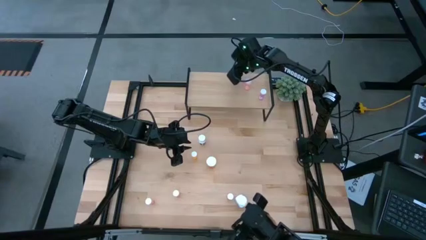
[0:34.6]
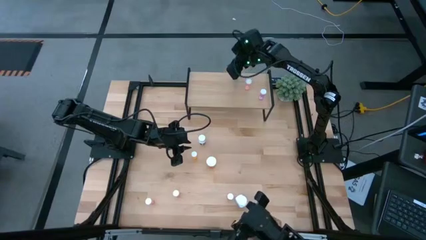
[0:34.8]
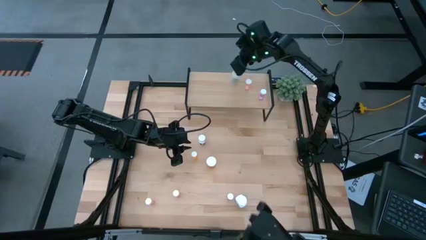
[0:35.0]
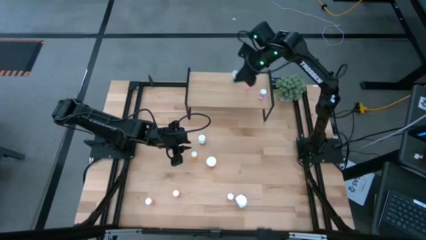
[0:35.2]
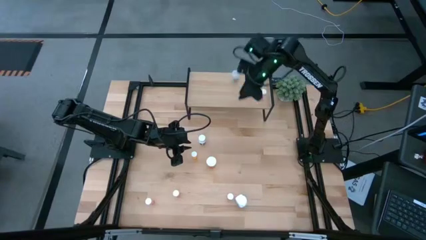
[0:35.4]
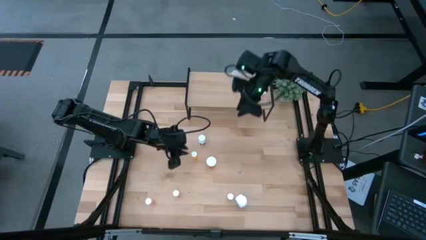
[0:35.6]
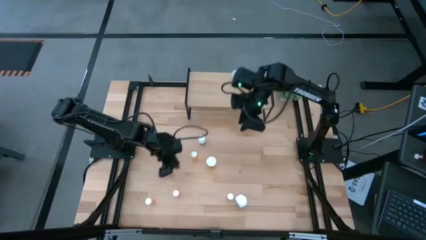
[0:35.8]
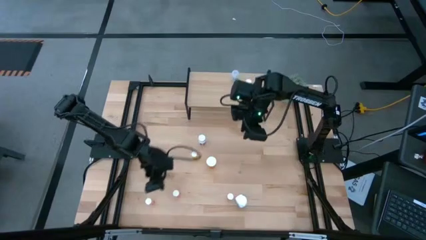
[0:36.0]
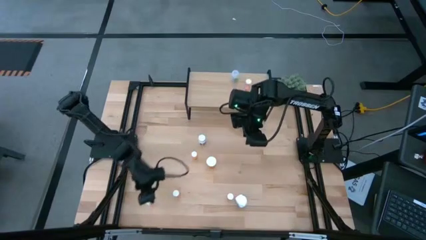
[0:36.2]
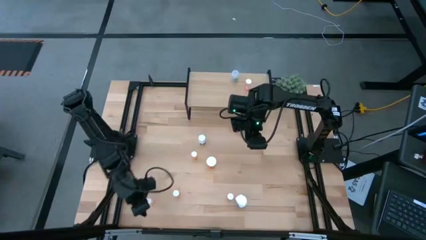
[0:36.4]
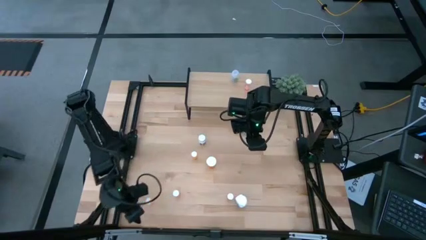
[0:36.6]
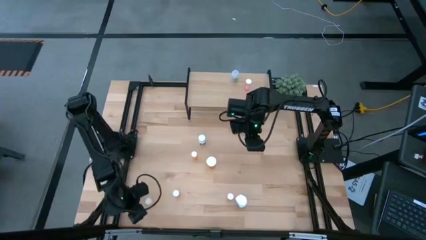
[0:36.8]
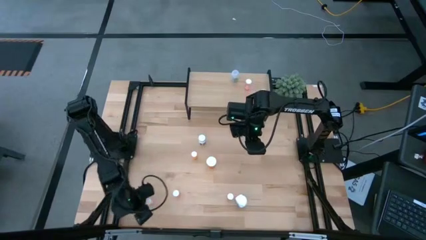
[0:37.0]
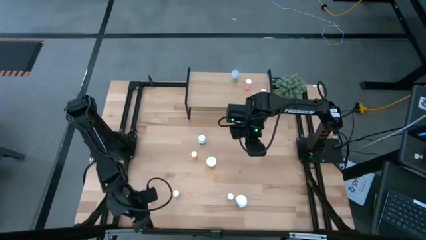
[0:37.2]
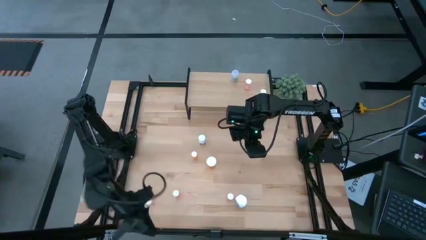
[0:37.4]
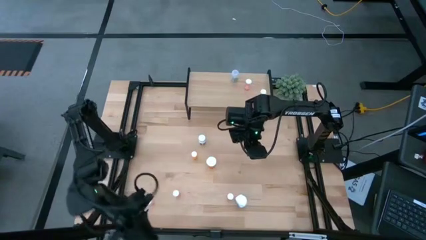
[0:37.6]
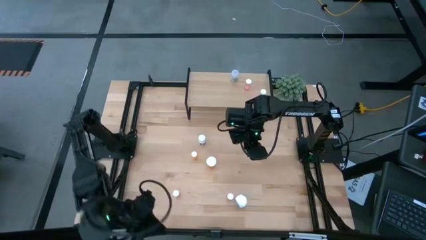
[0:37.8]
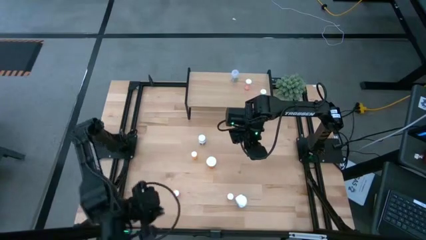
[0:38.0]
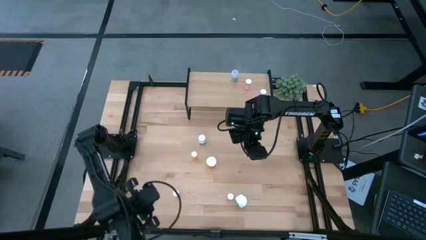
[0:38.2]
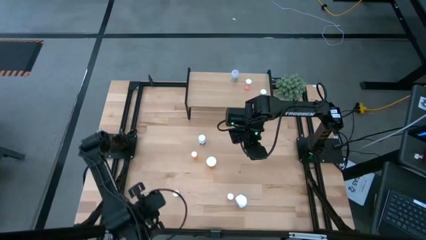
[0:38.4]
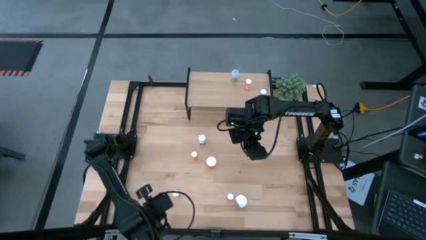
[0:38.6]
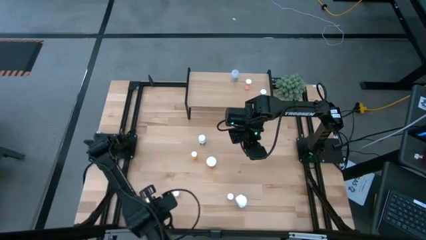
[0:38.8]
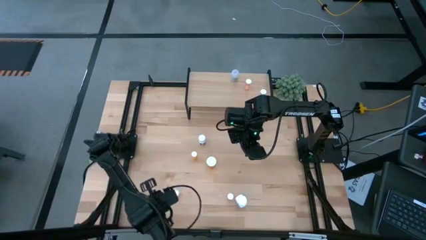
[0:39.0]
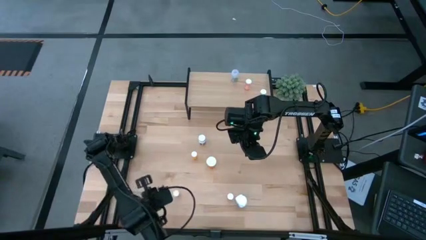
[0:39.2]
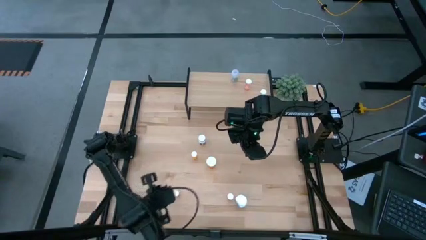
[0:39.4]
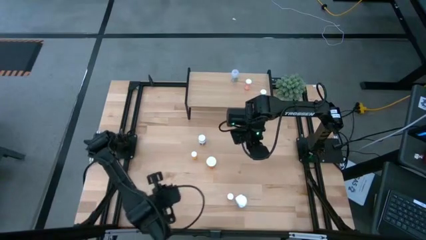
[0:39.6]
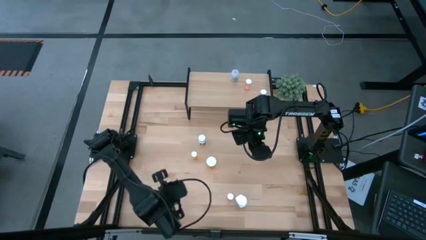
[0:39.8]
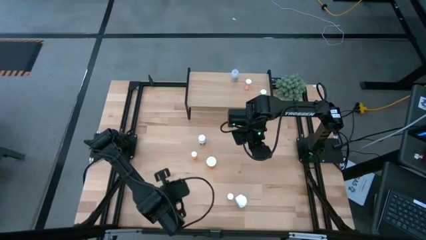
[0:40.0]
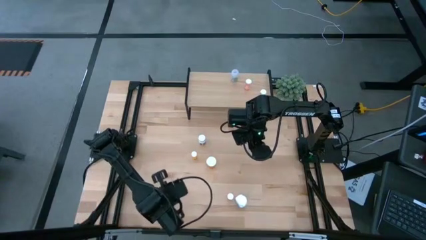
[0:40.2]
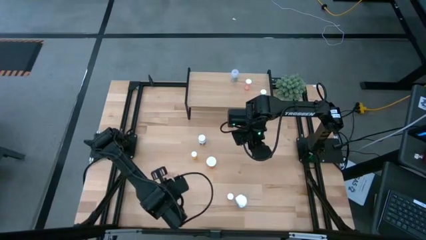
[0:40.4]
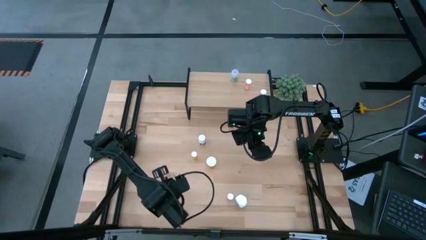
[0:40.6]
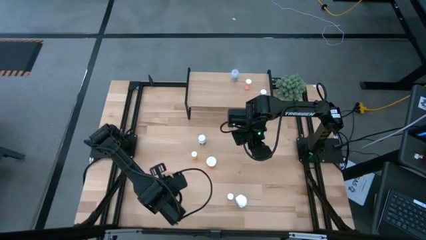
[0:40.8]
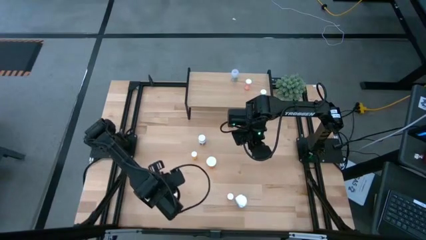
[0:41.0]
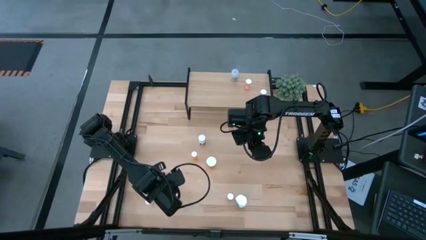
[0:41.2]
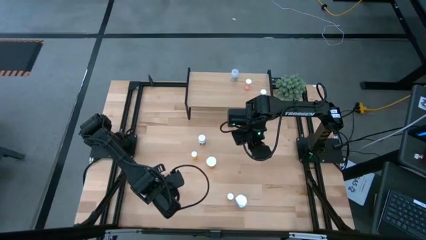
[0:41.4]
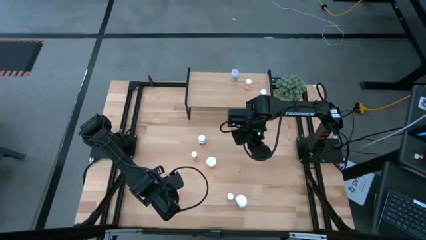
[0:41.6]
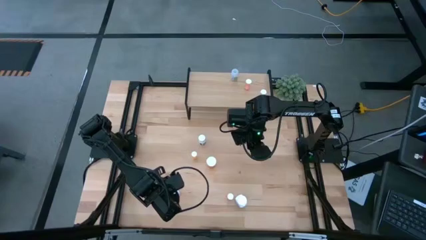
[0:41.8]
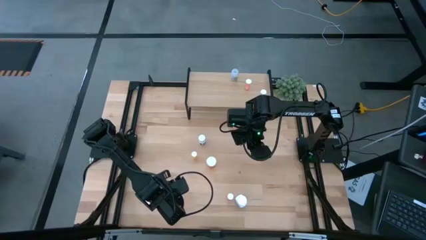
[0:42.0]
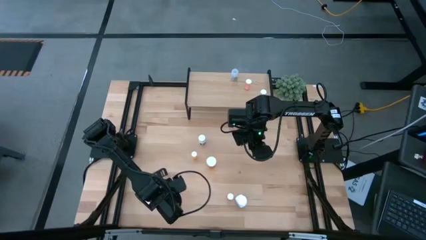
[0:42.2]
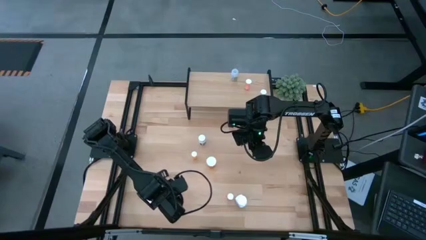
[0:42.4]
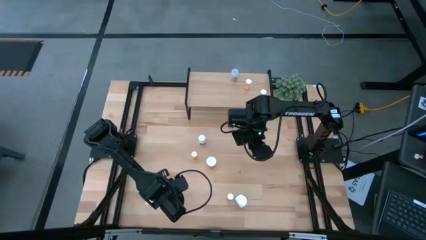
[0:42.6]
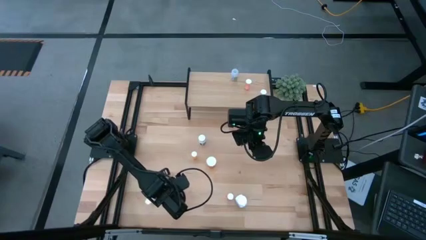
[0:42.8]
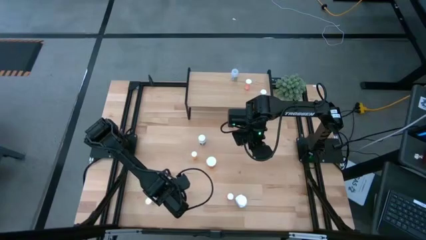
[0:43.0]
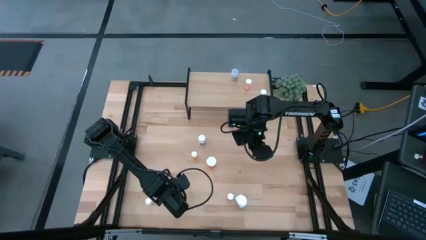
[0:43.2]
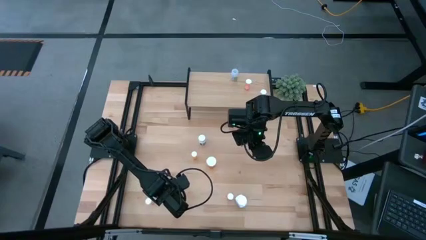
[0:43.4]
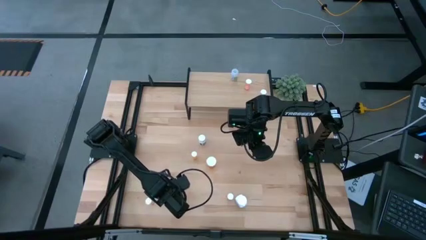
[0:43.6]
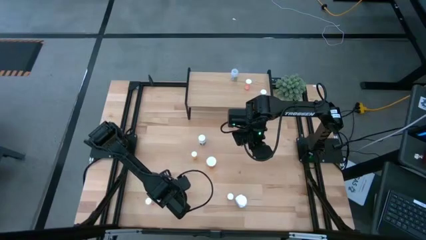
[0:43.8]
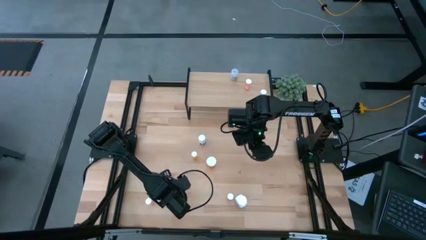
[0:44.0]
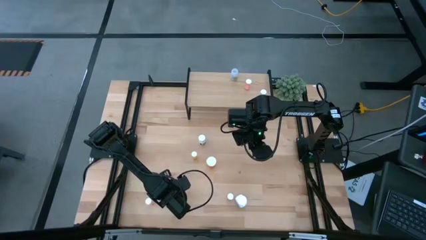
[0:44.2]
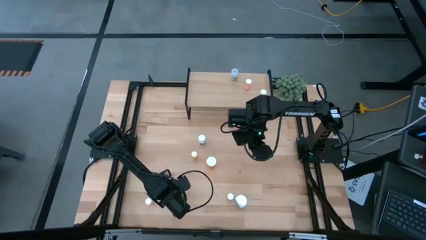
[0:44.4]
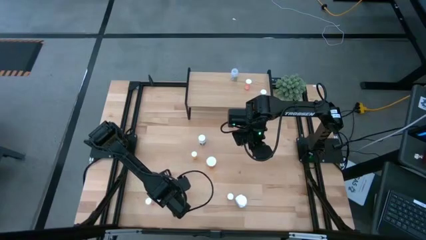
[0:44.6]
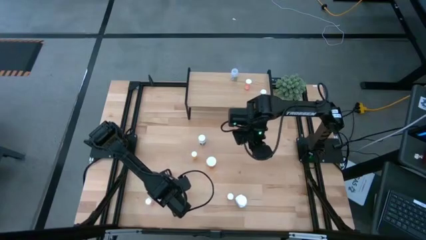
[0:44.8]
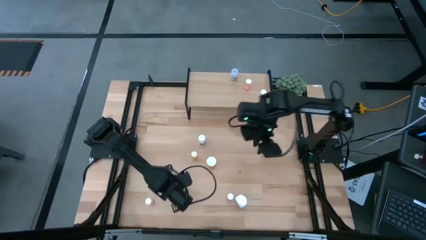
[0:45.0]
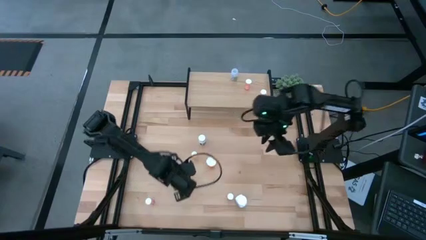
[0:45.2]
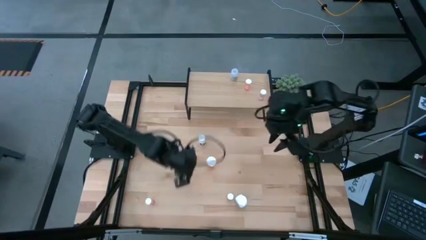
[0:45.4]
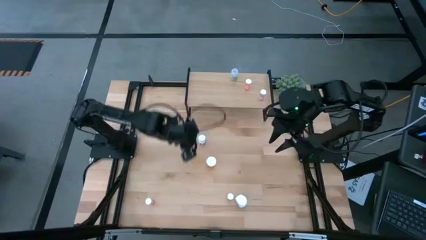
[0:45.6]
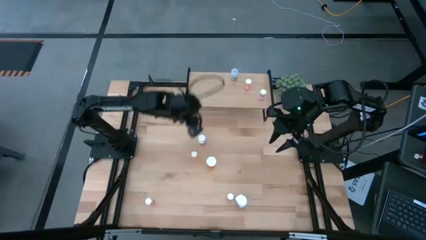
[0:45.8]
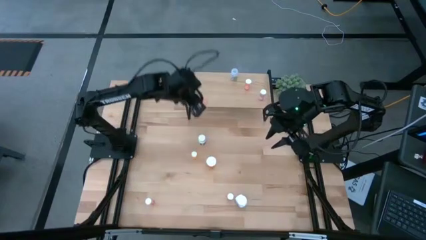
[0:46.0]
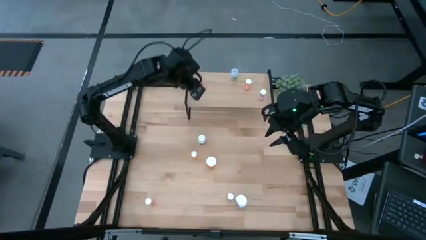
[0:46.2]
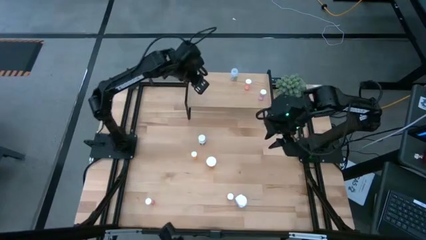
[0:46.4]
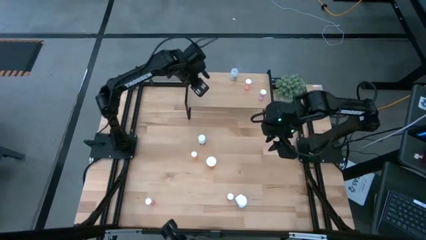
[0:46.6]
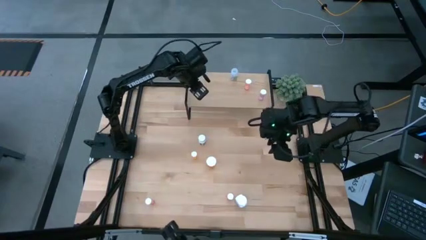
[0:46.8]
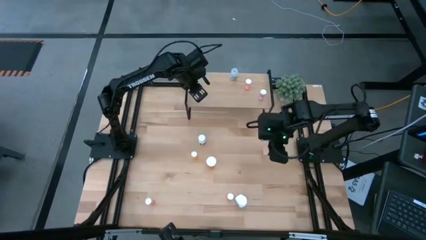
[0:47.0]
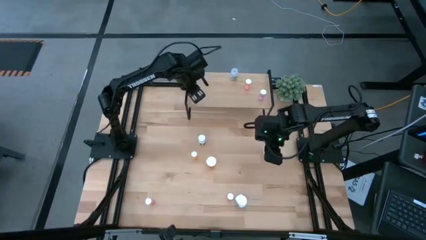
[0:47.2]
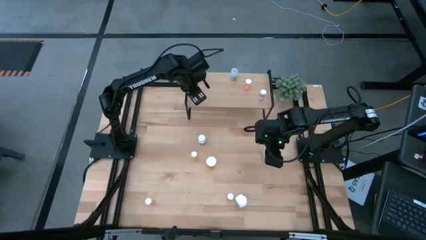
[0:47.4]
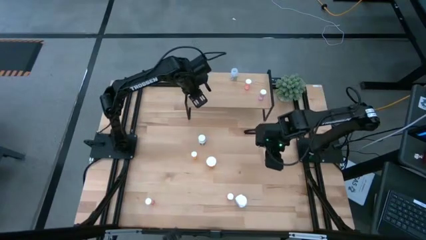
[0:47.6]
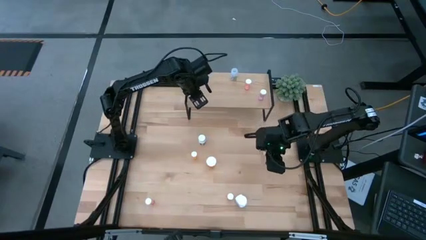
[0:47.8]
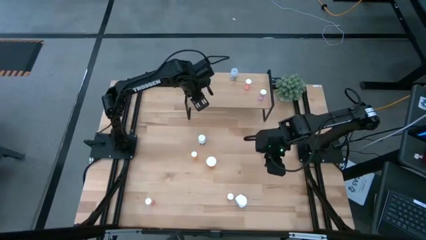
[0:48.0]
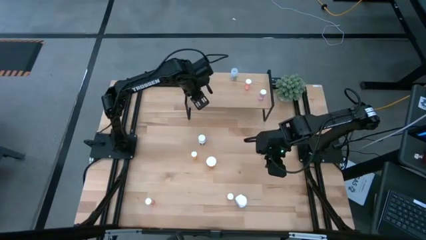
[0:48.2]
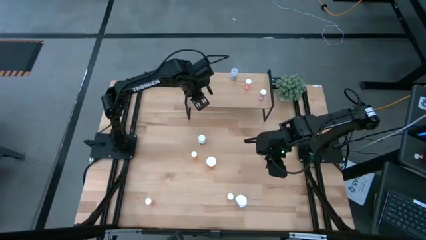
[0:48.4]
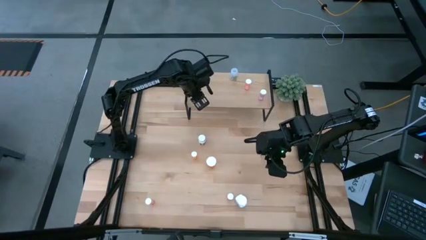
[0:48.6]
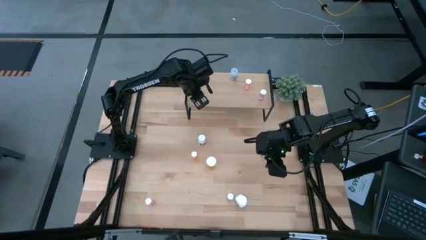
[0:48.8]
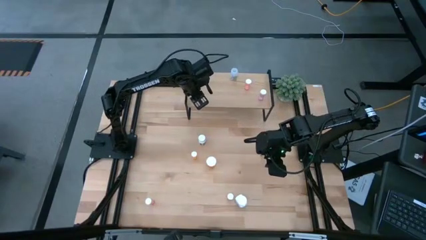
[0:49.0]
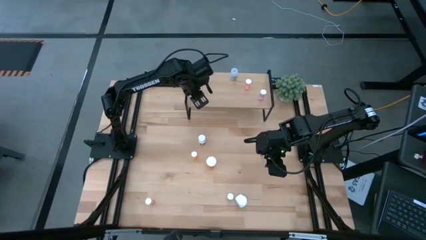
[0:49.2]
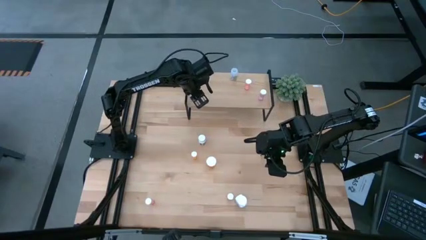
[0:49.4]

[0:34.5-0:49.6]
Task: Pick and place medicine bottles onto shelf by color
Put the middle pink pill bottle on the shelf
